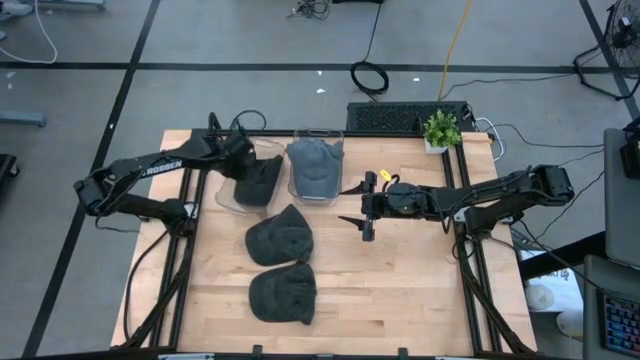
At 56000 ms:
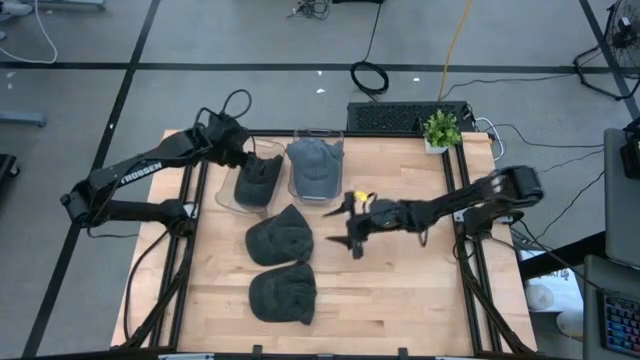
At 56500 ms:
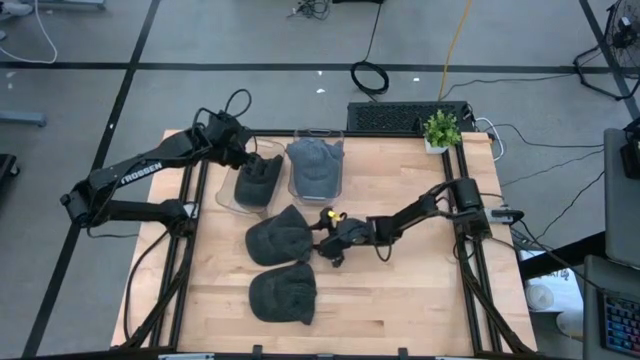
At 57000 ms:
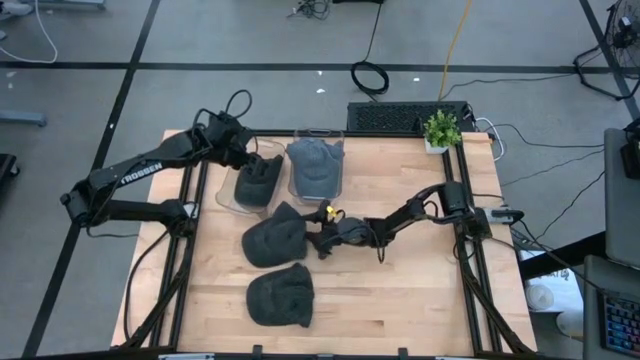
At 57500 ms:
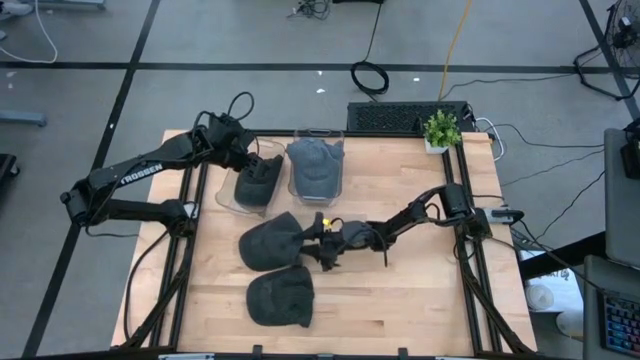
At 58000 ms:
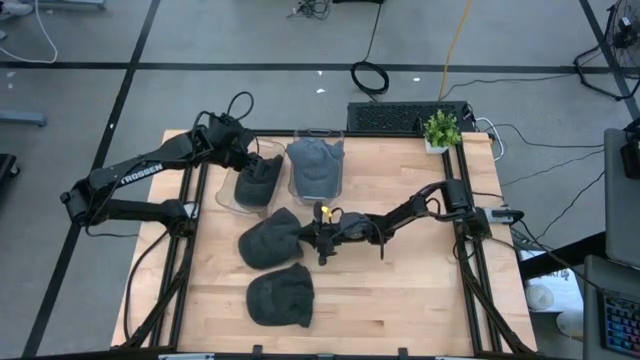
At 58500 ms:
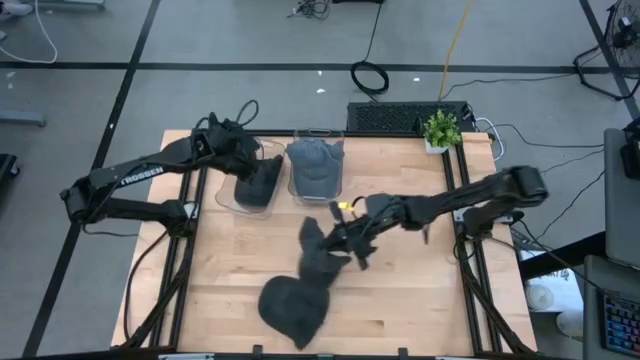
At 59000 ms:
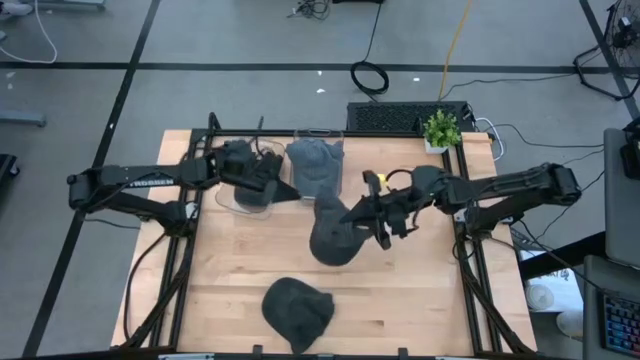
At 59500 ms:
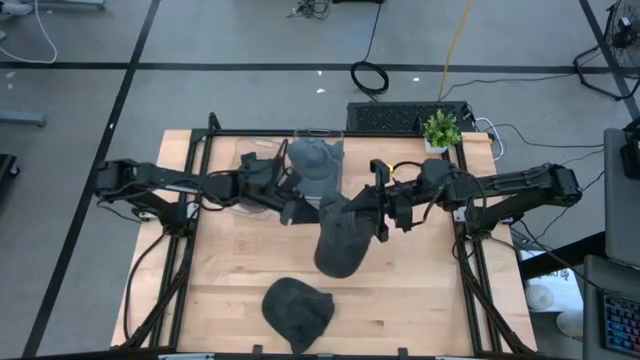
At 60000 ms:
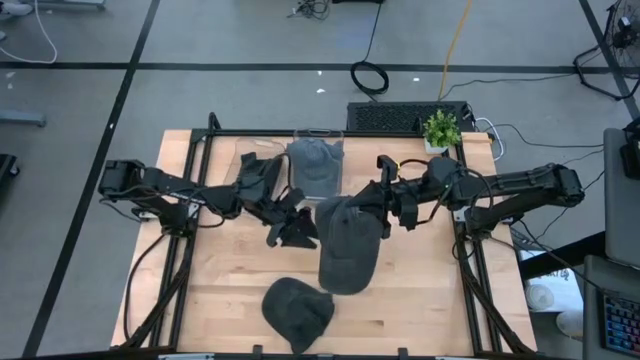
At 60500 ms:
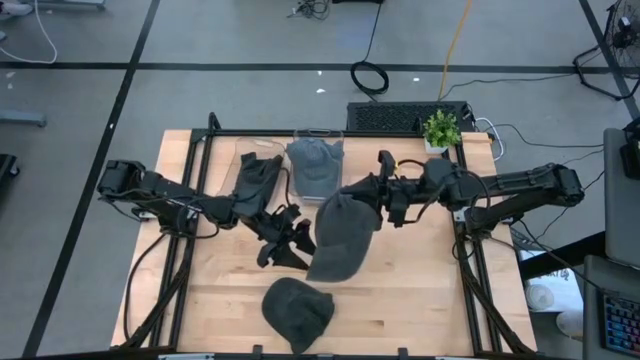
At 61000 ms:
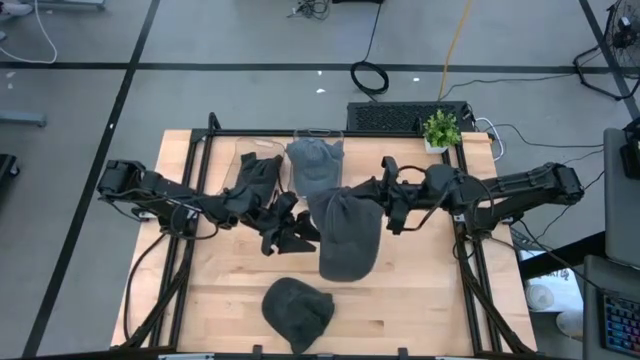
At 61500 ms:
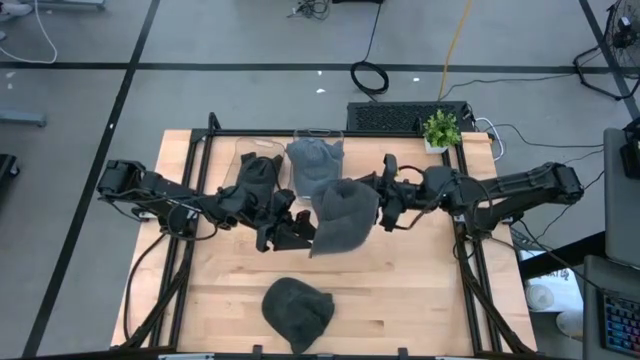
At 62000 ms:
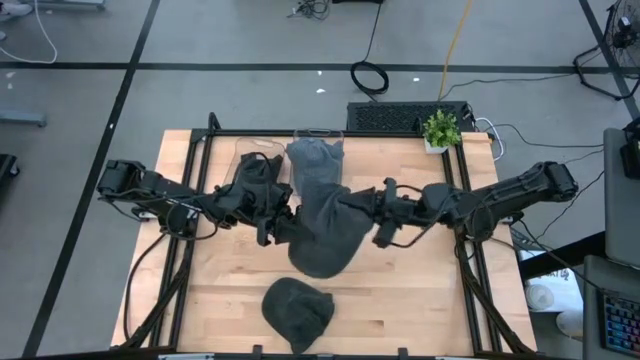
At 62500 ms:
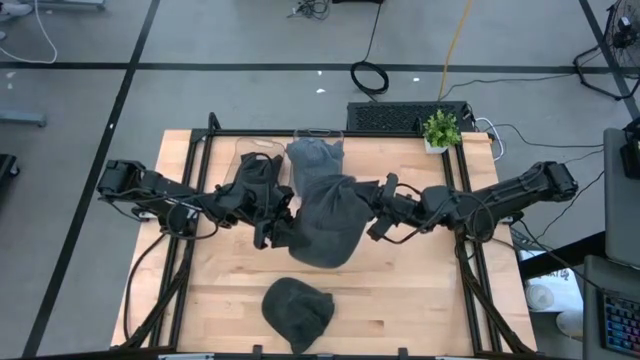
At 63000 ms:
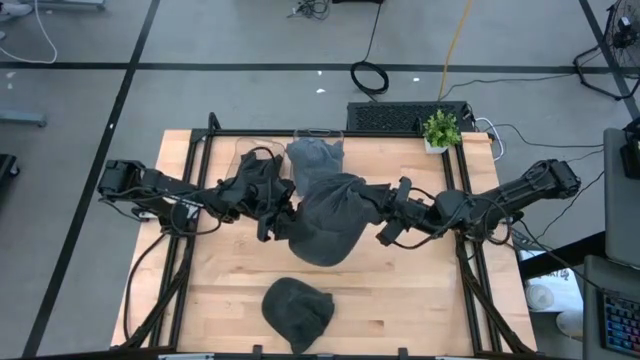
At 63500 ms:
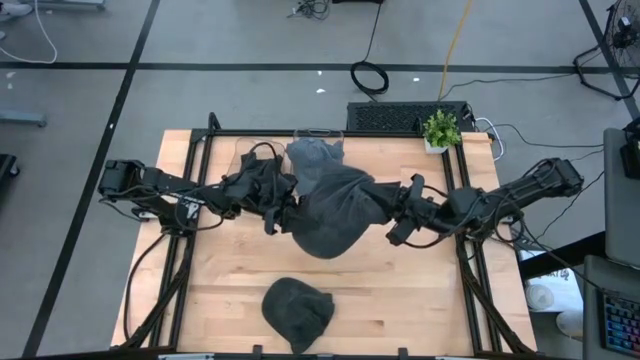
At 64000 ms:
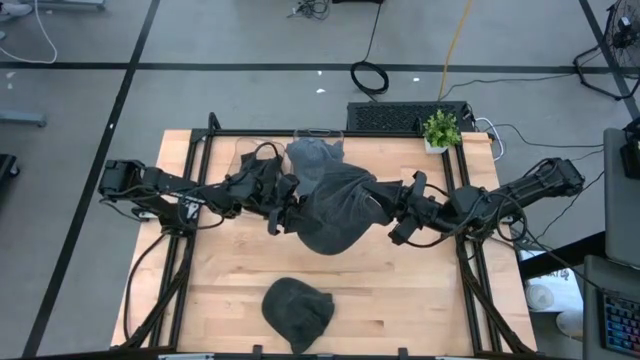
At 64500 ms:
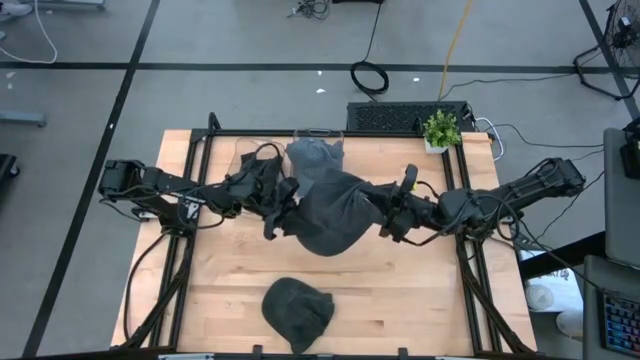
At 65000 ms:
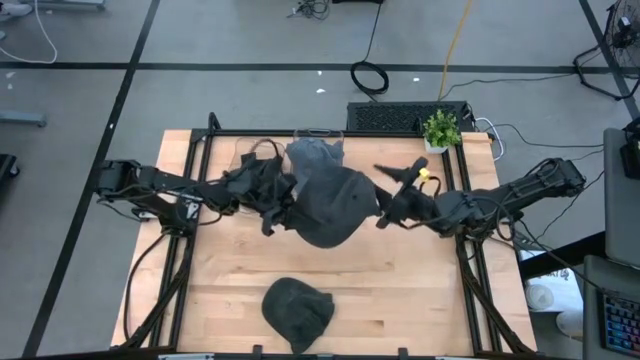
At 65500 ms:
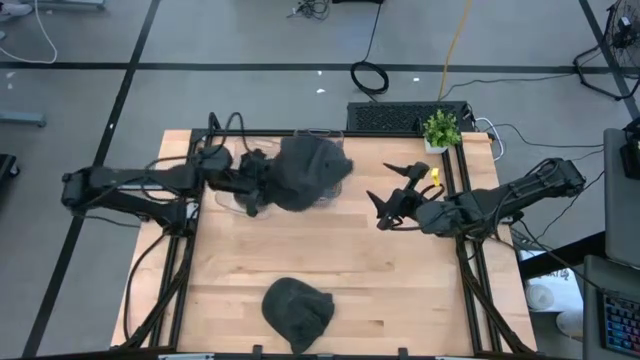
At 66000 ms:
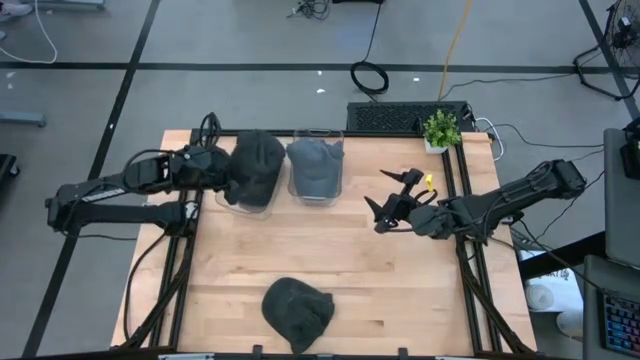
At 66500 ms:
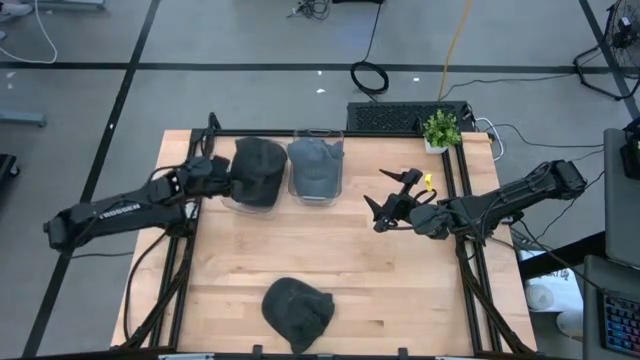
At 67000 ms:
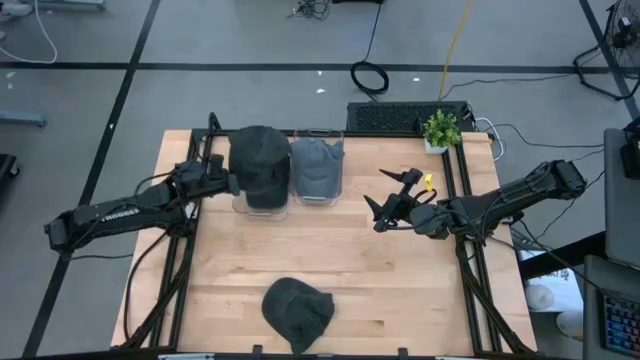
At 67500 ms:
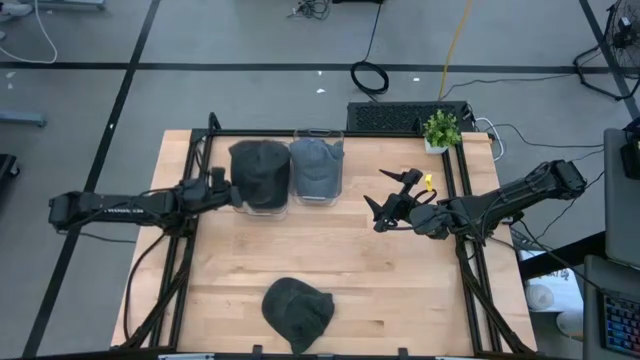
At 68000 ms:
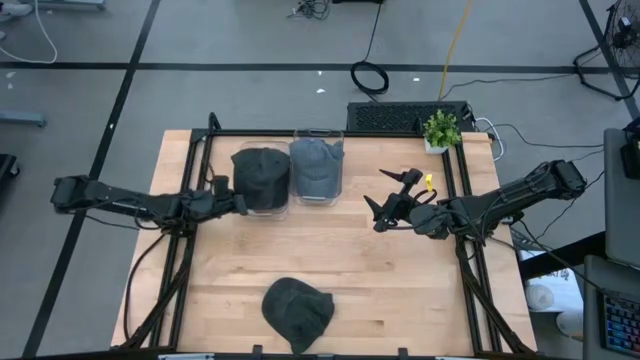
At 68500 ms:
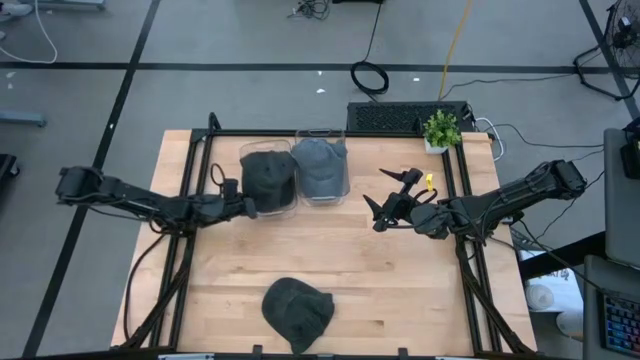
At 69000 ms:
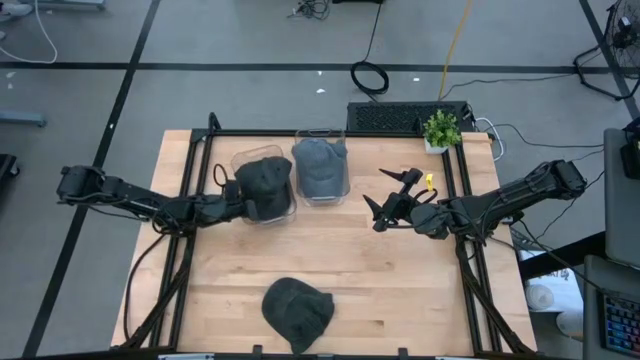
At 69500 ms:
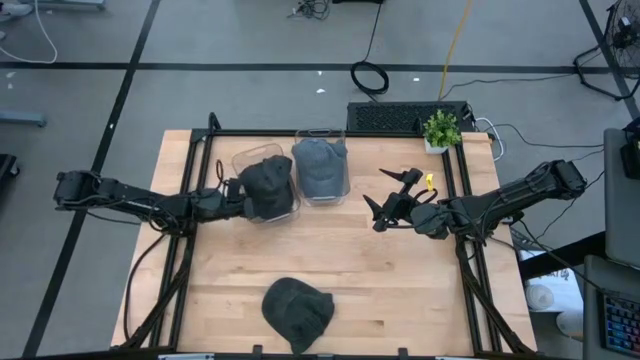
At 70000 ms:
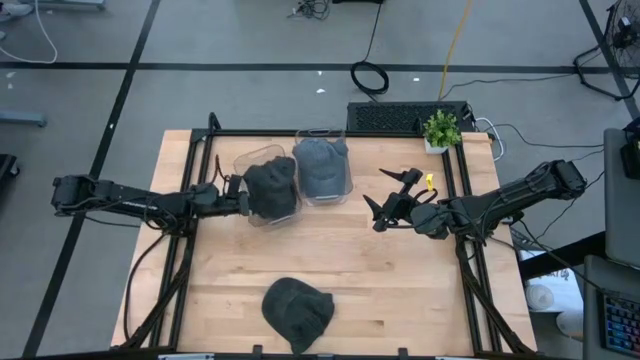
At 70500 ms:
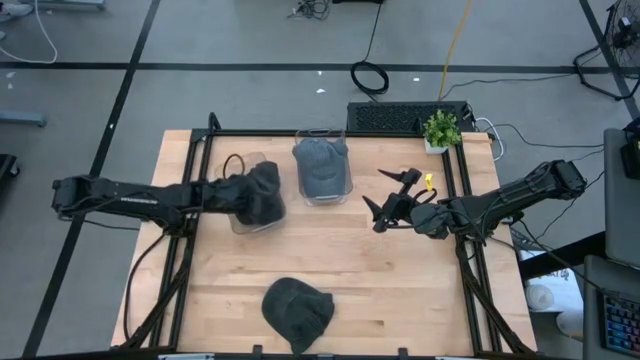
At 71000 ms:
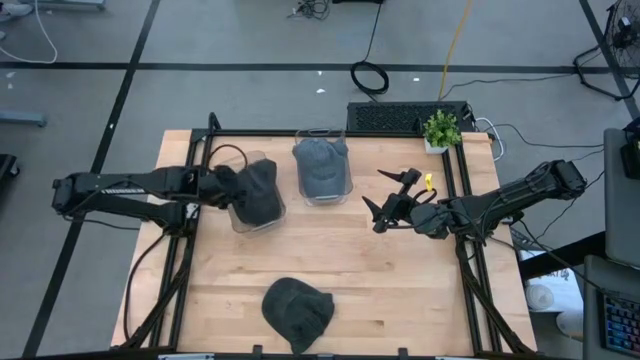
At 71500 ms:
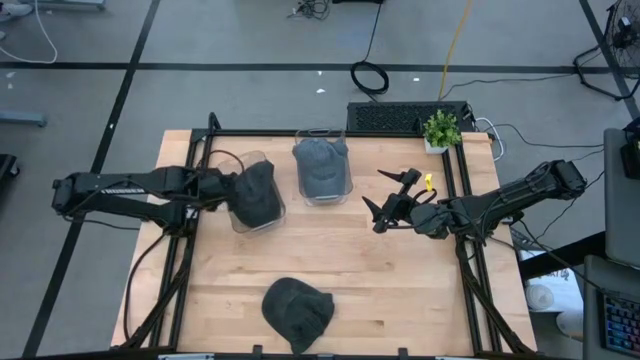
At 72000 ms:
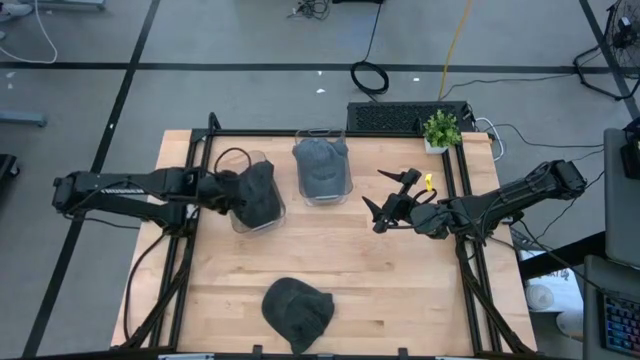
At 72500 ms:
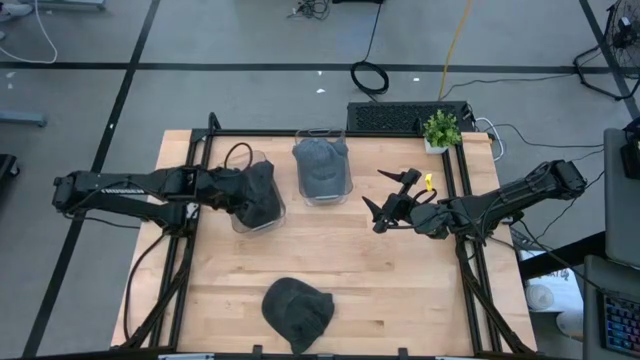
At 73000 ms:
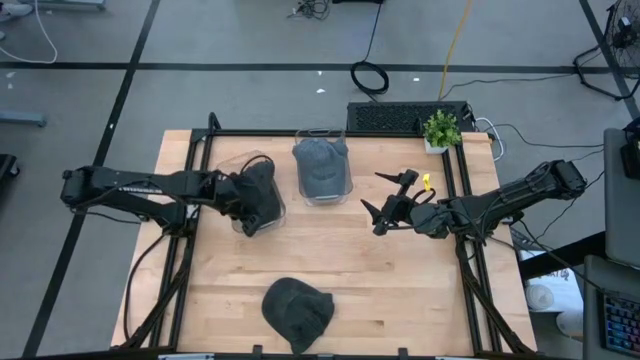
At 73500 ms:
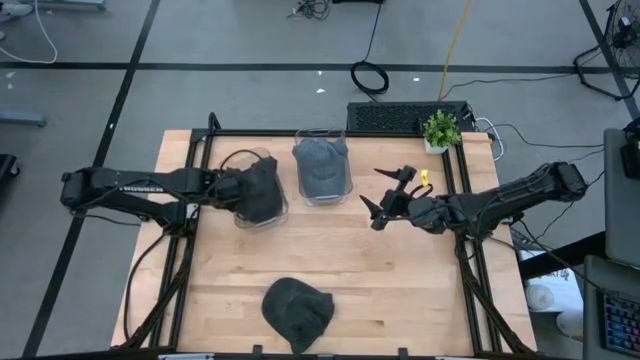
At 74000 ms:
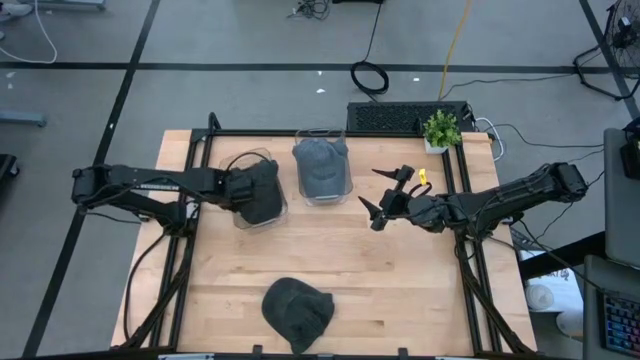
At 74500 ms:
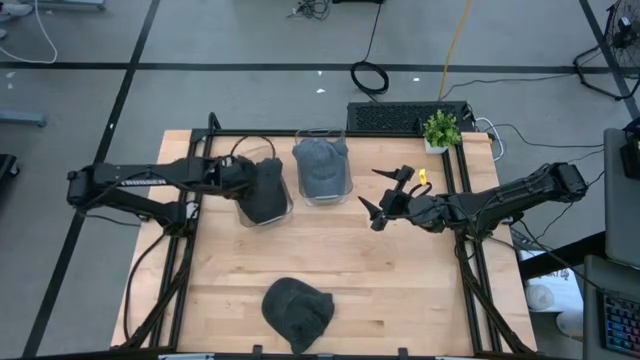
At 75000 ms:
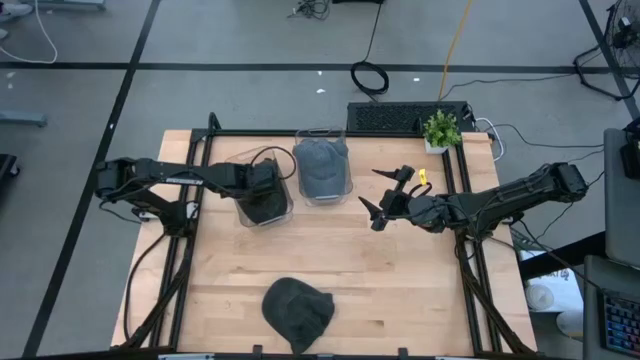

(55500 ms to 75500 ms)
Task: Pick & Place hat
Put the top black cap into the left transparent bin

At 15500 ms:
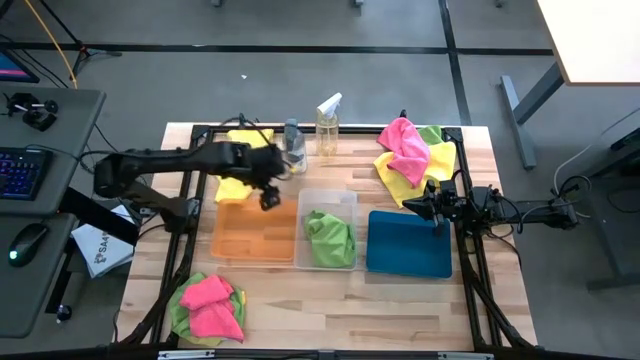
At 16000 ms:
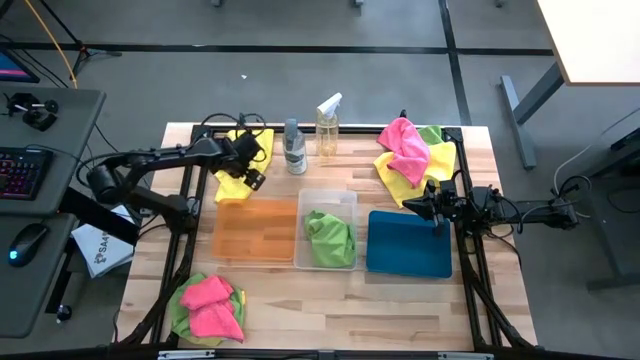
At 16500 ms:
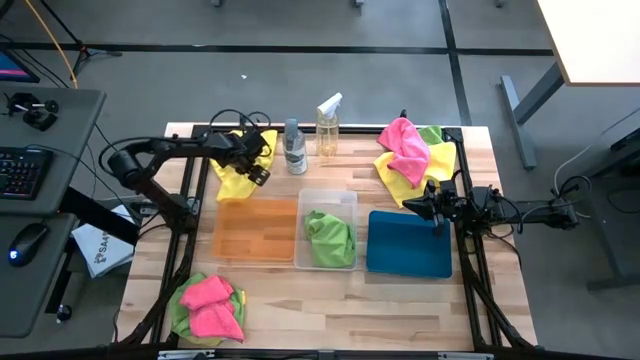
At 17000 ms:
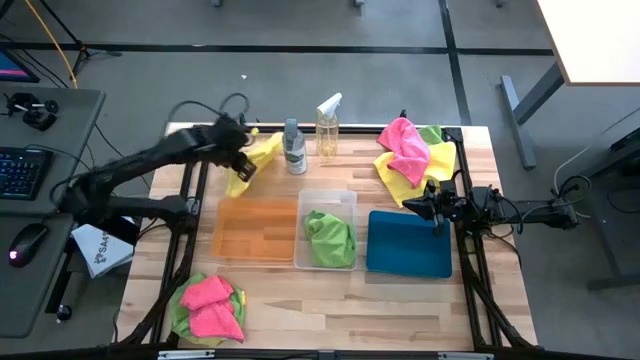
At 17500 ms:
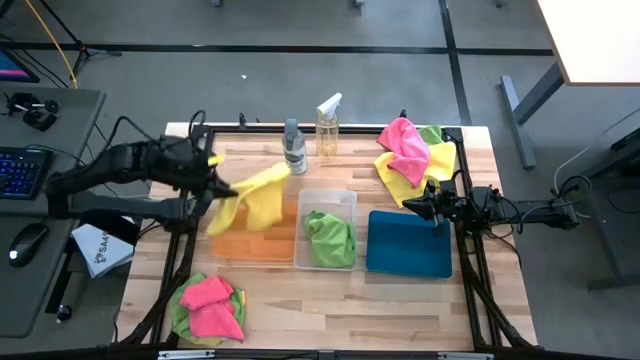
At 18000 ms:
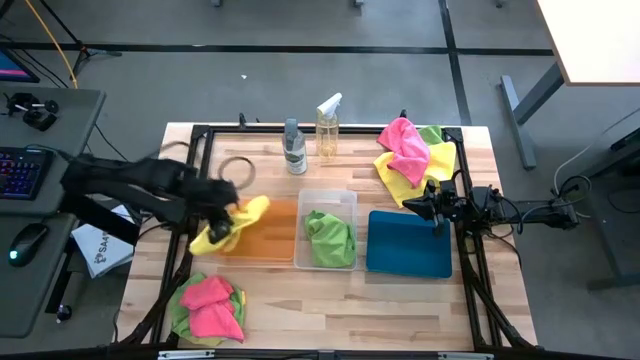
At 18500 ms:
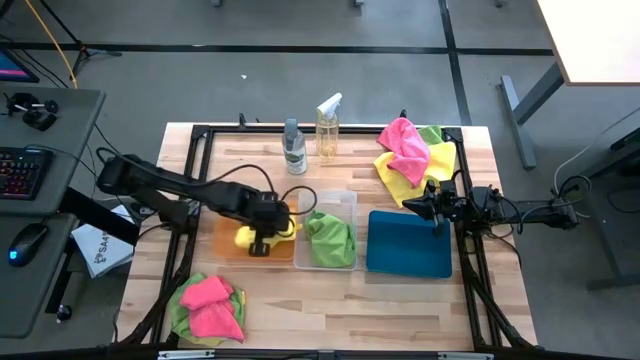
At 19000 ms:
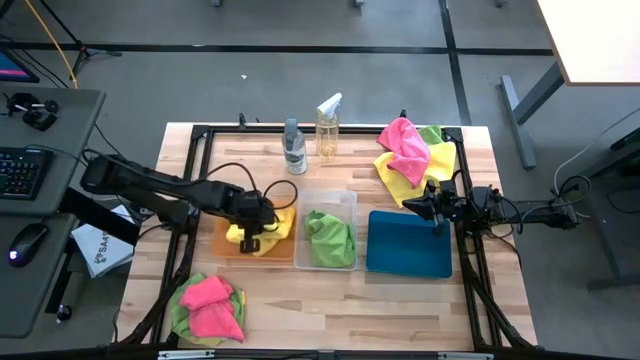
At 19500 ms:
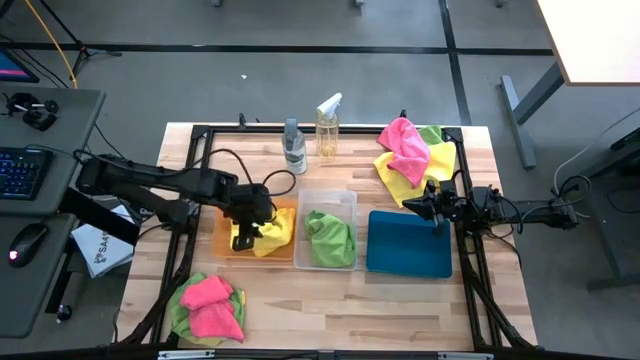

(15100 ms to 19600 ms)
Task: Sort microfiber towel by color & place in baskets
Put the top left yellow microfiber cloth into the orange bin
